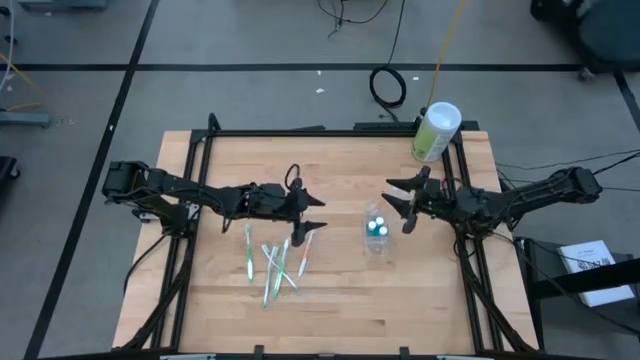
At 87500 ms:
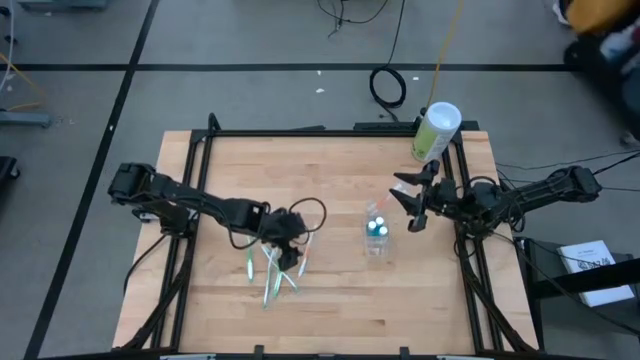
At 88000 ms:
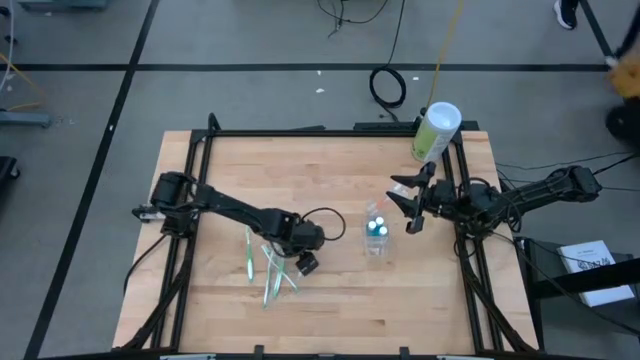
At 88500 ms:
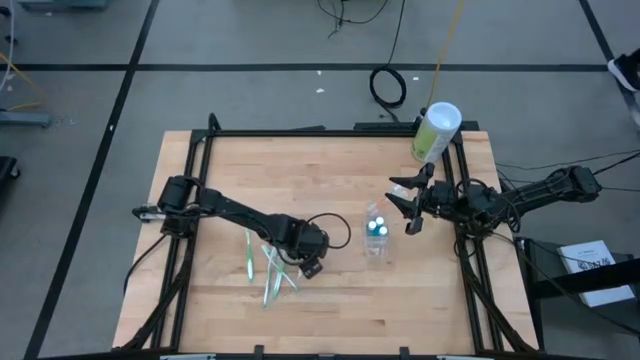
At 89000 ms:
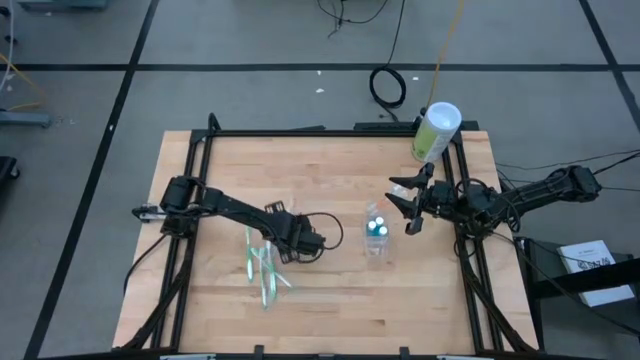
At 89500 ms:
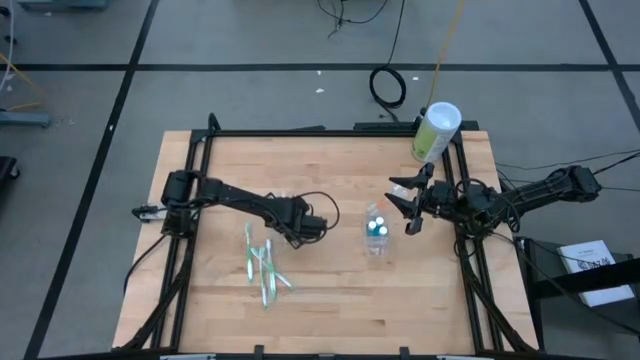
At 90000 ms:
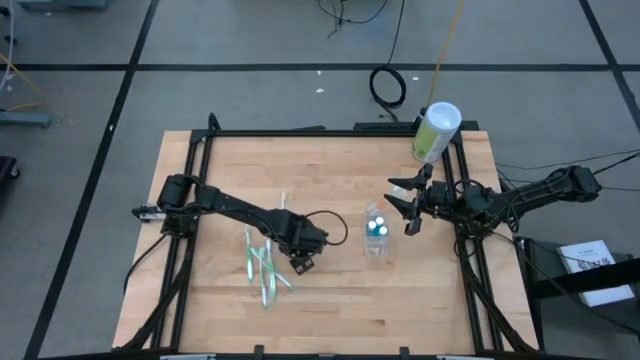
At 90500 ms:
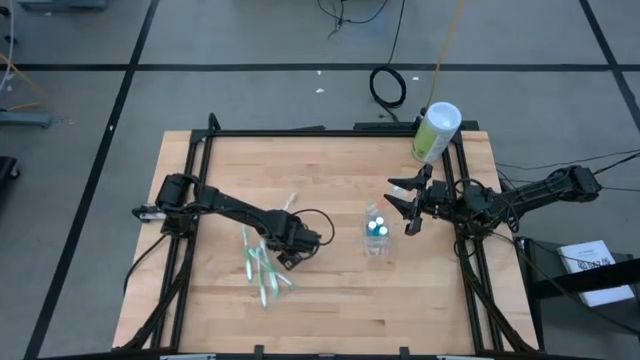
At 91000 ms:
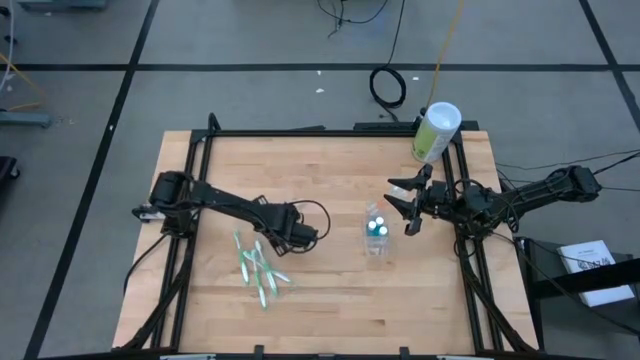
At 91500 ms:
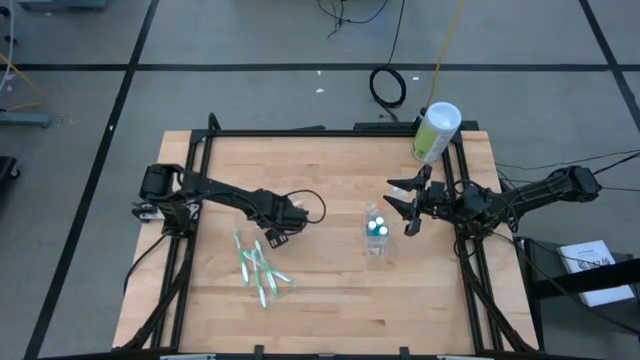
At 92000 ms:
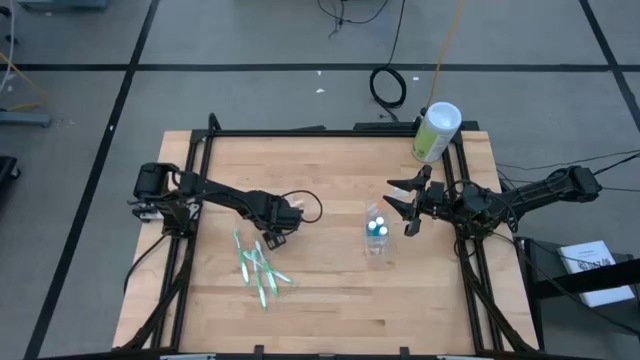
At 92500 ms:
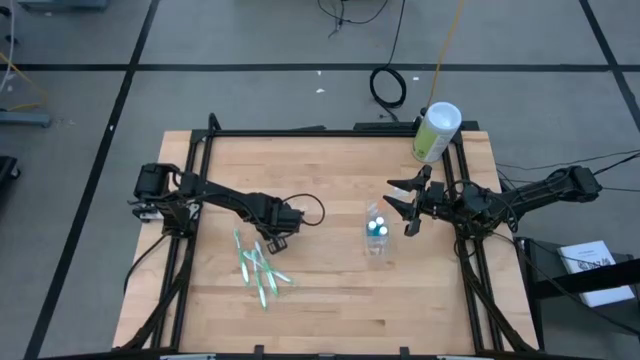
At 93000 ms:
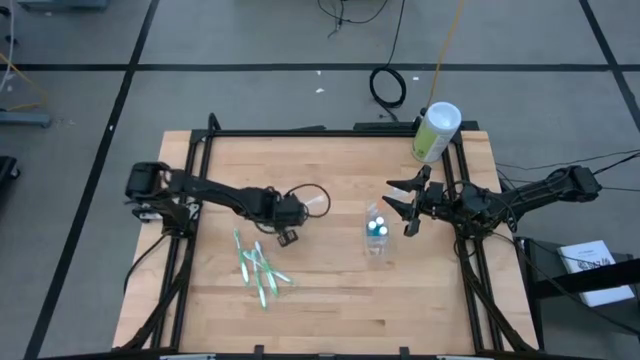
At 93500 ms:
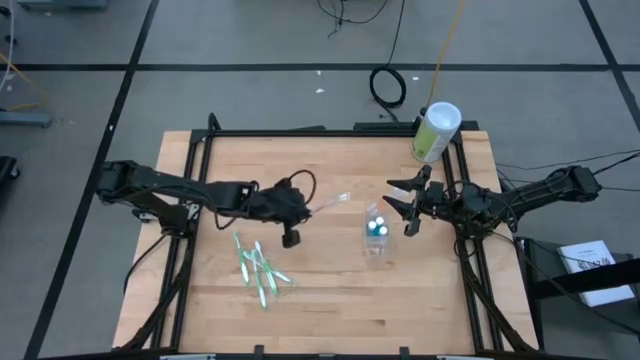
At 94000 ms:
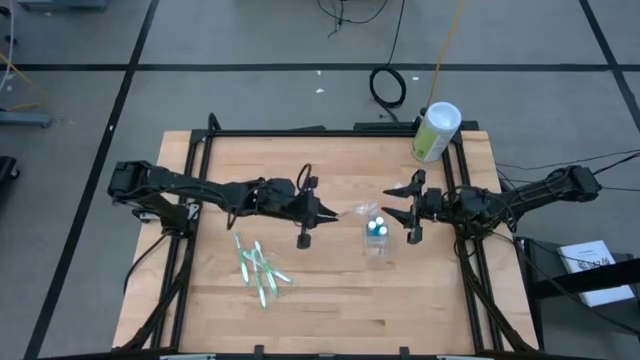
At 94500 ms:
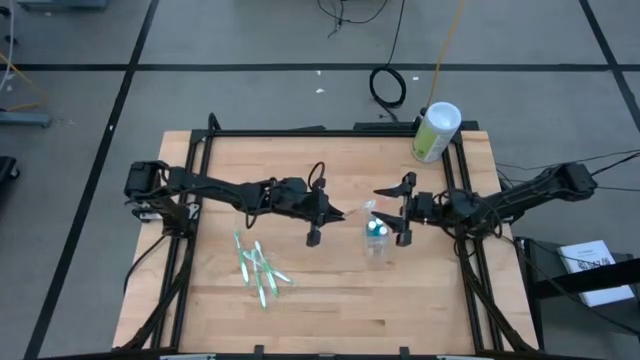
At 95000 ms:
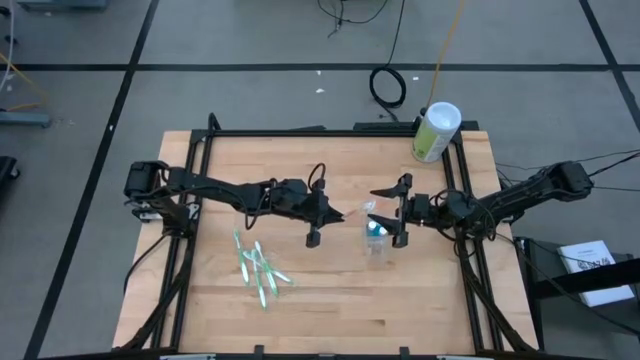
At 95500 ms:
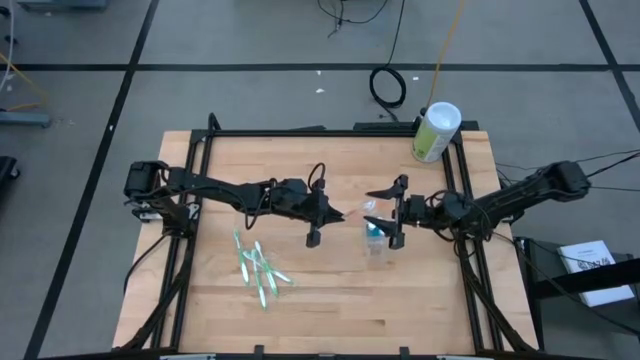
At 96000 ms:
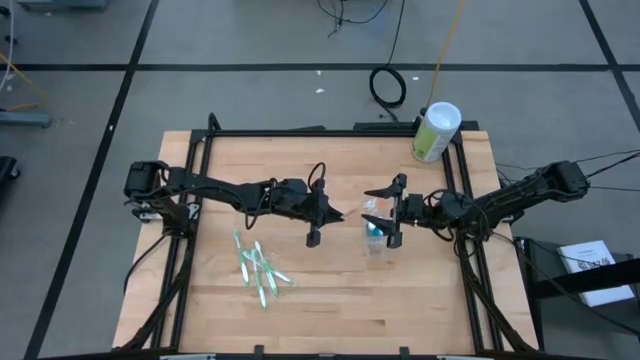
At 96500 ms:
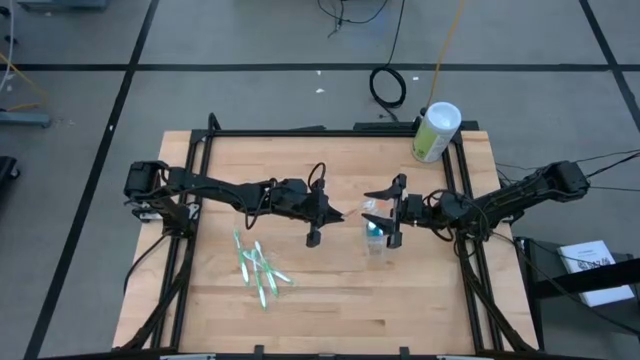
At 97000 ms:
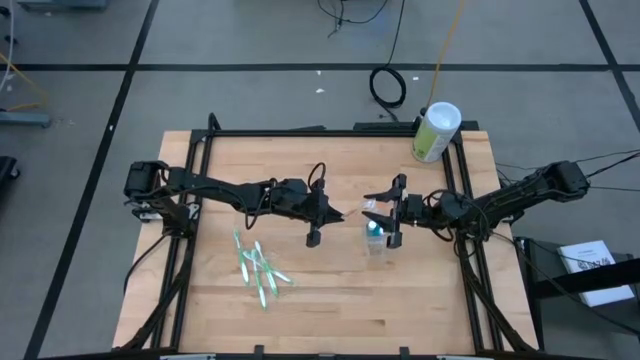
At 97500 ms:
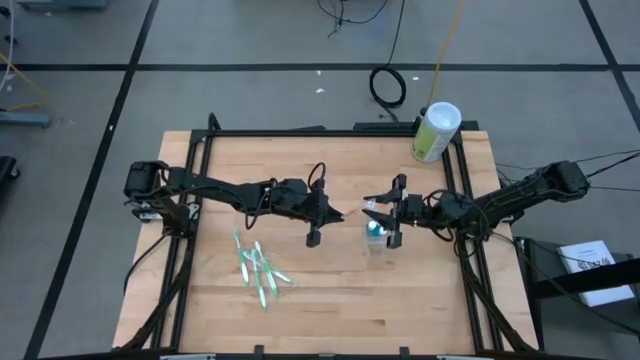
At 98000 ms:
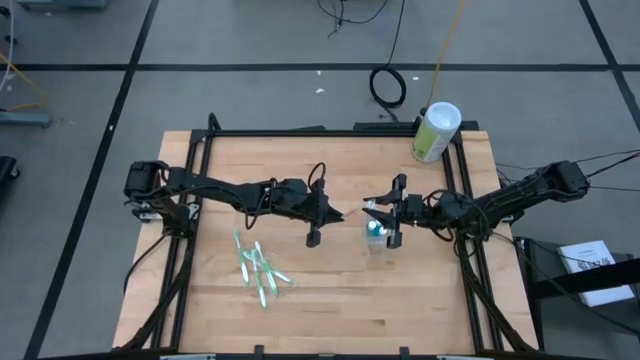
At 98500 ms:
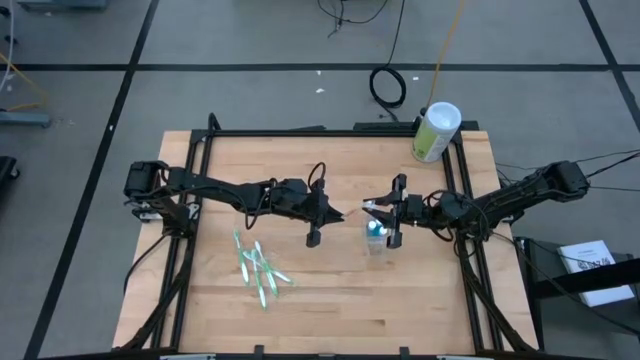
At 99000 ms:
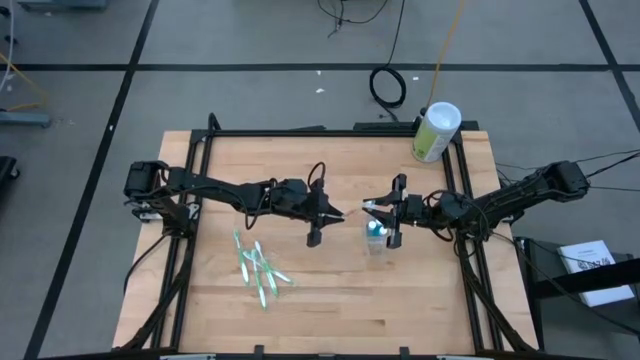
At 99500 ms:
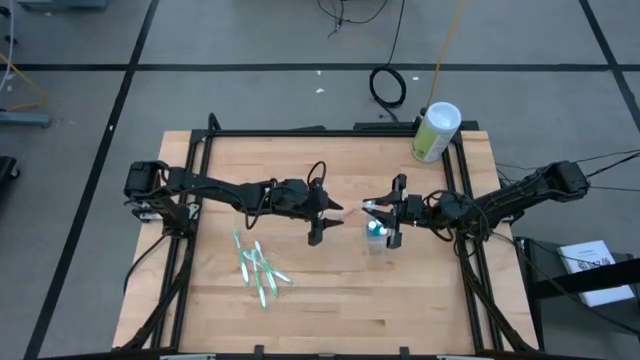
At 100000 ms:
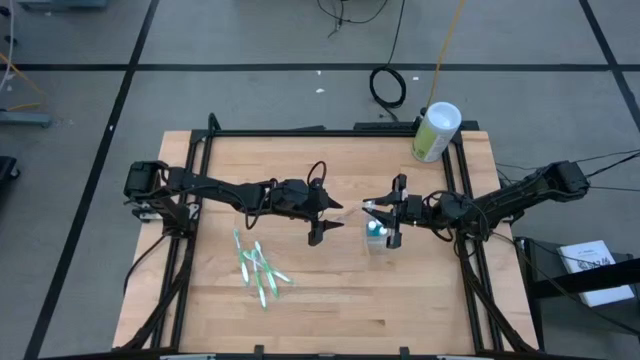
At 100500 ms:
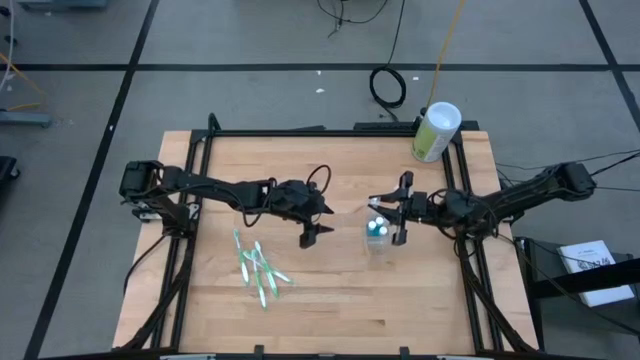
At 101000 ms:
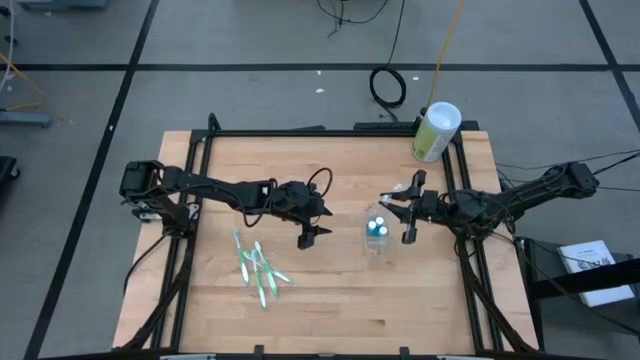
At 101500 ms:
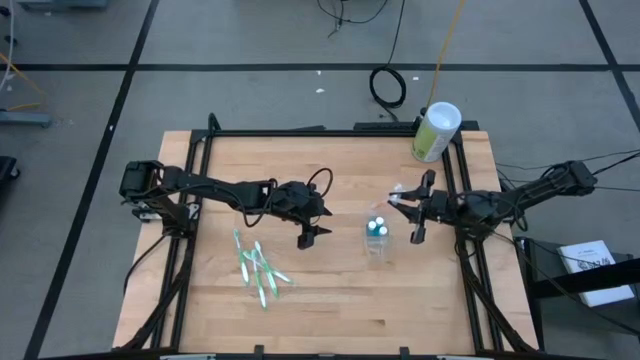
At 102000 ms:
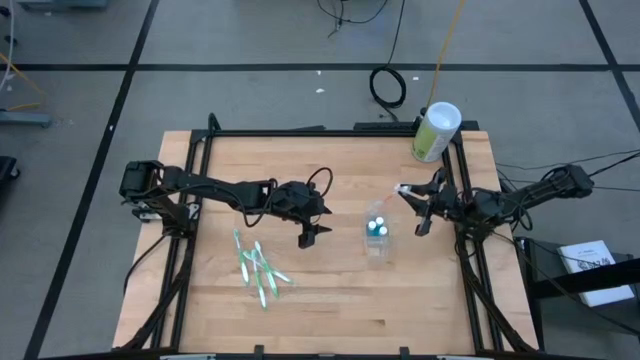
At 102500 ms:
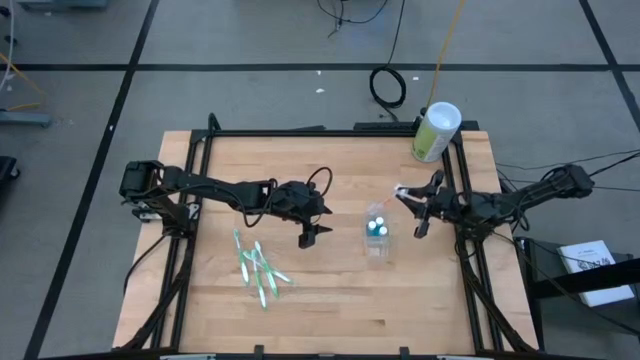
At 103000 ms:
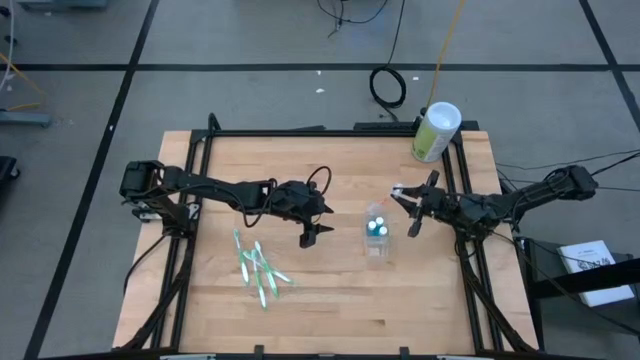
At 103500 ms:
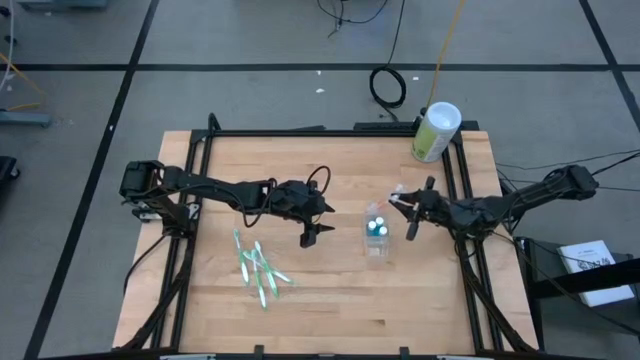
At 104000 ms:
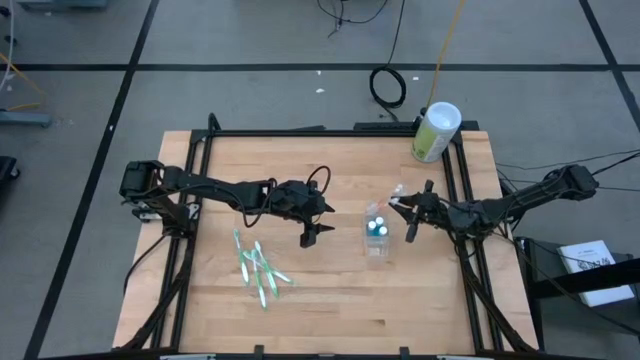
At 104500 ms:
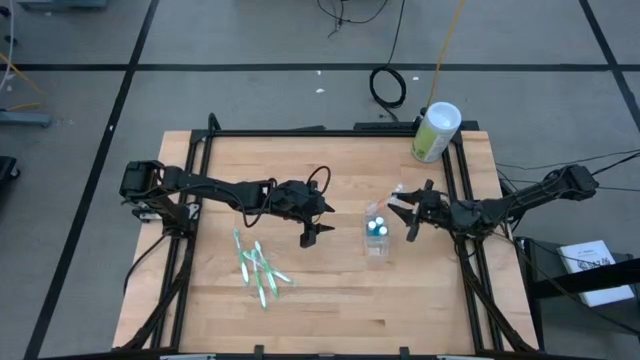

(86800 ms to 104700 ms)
Task: Pick & Place toothbrushing station
Put the orange toothbrush into the top of the transparent organizer

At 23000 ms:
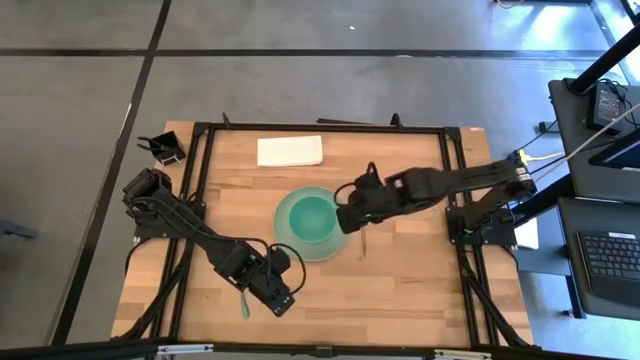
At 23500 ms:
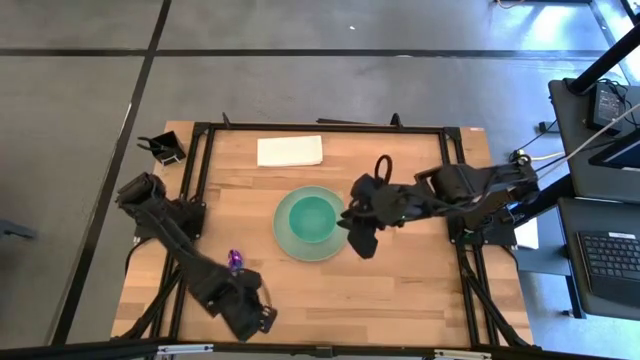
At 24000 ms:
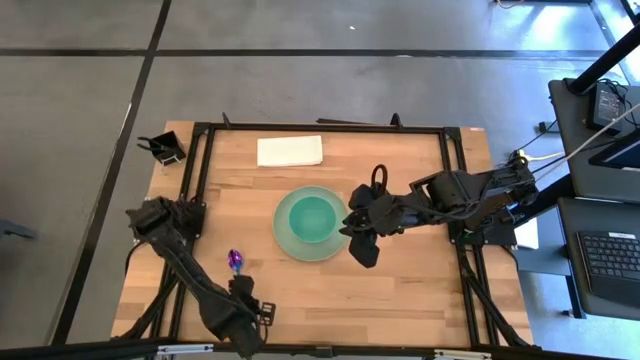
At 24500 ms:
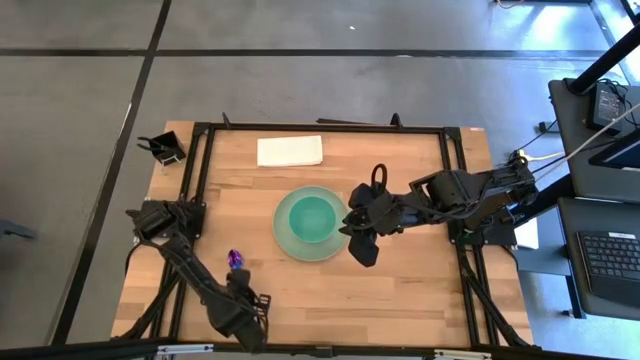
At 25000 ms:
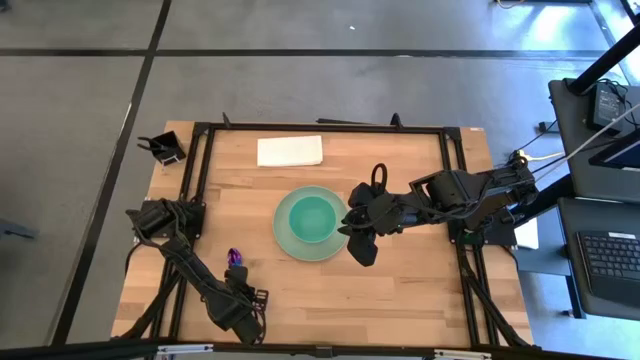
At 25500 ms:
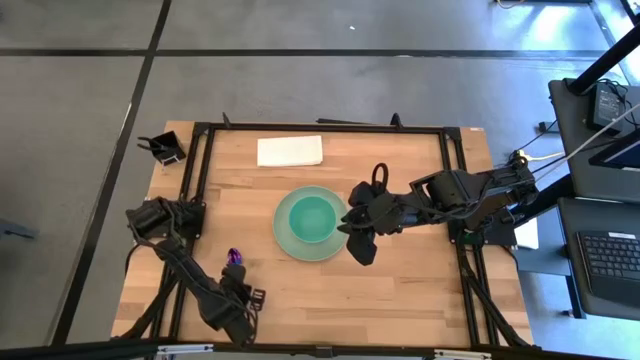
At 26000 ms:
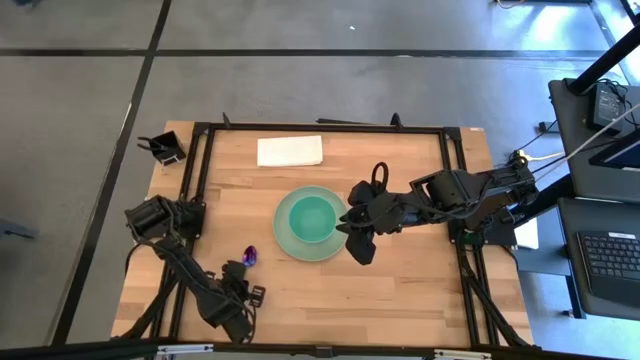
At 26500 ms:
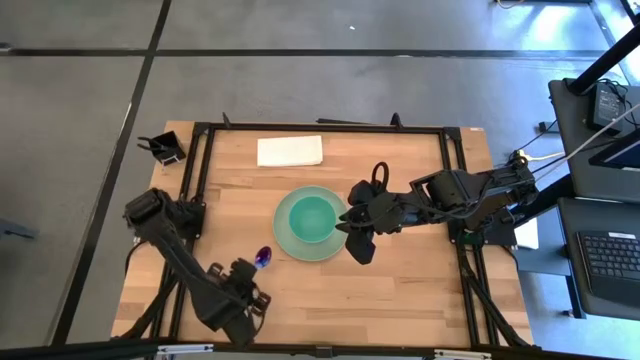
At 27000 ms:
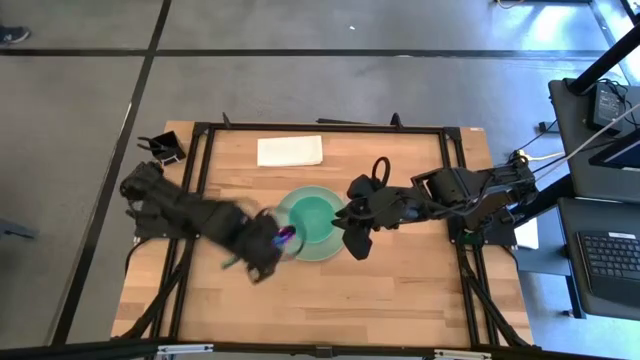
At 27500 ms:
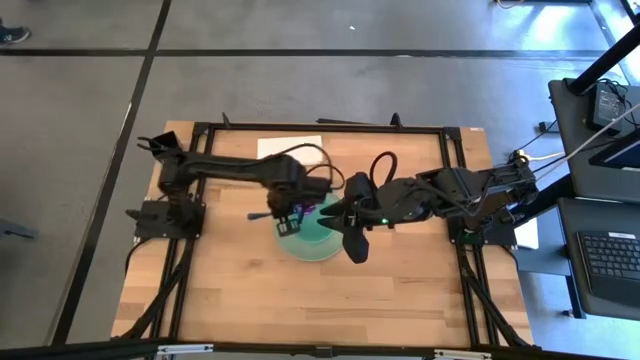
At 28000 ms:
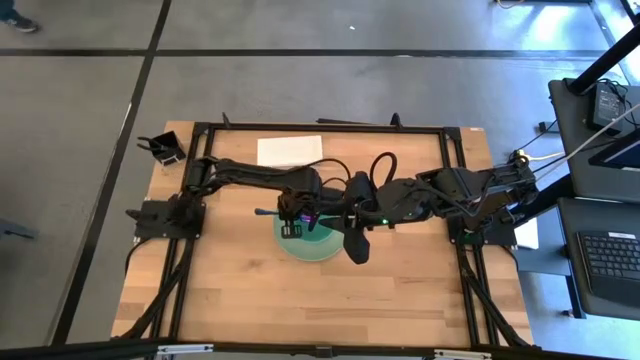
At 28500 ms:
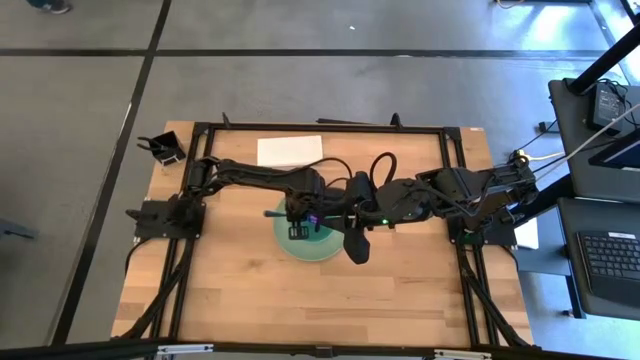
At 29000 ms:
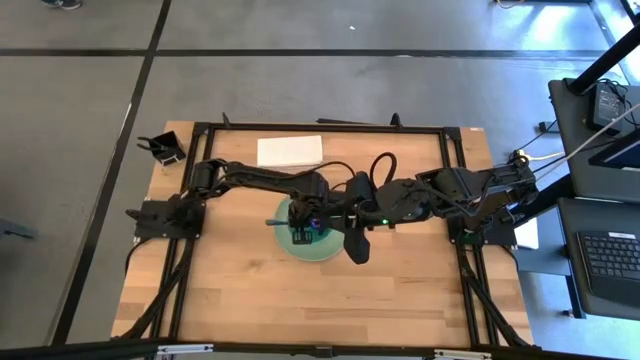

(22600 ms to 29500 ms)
Task: Set table place
Put the blue spoon into the bowl
